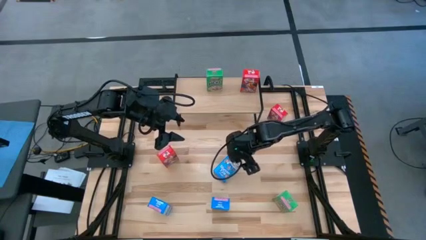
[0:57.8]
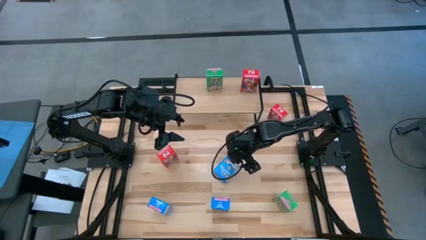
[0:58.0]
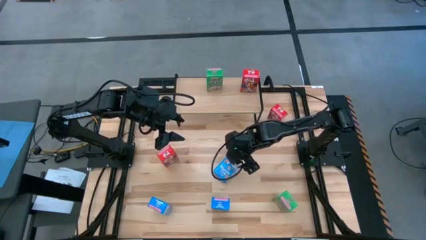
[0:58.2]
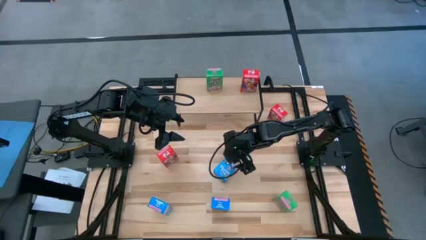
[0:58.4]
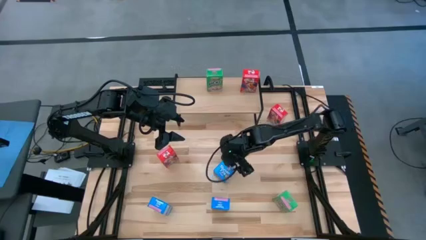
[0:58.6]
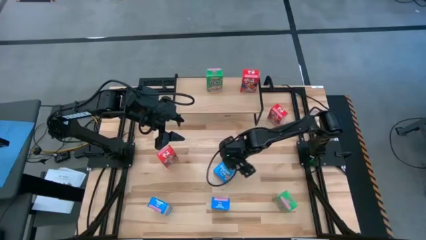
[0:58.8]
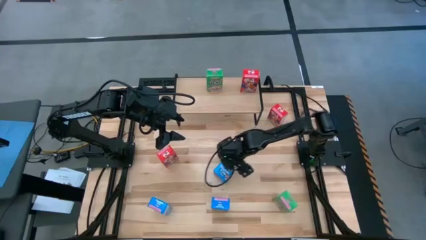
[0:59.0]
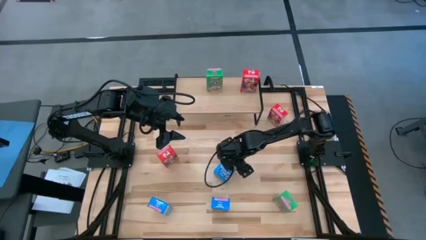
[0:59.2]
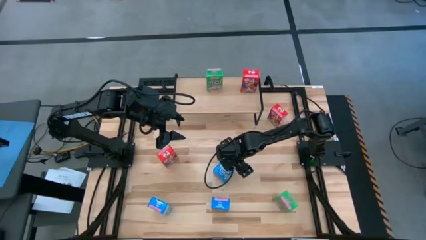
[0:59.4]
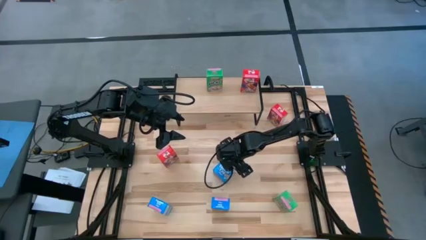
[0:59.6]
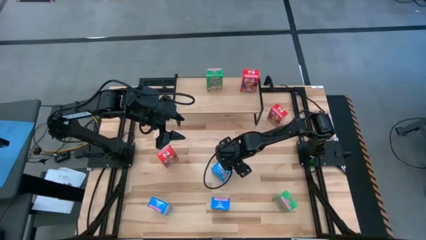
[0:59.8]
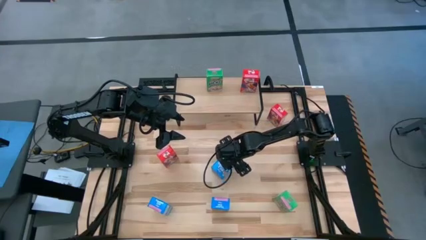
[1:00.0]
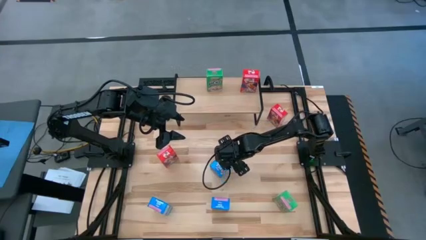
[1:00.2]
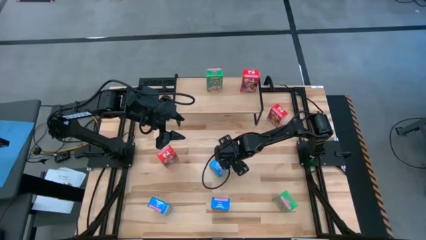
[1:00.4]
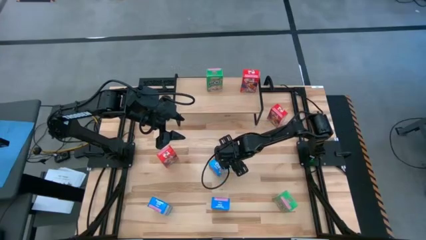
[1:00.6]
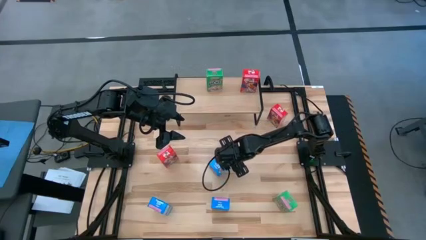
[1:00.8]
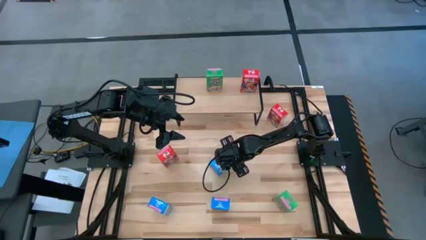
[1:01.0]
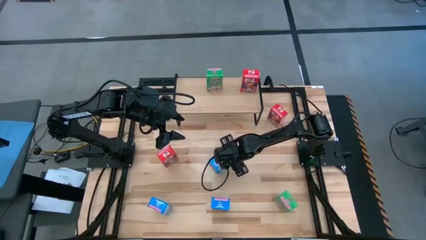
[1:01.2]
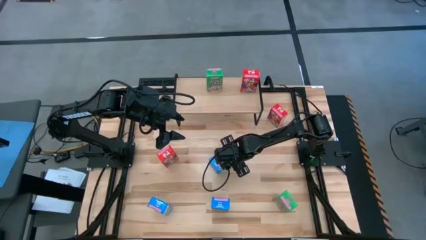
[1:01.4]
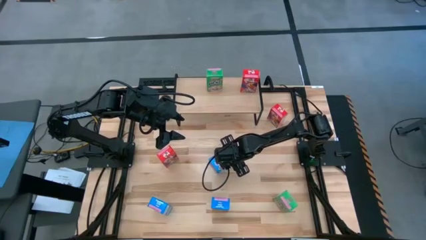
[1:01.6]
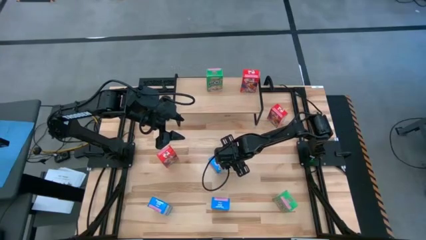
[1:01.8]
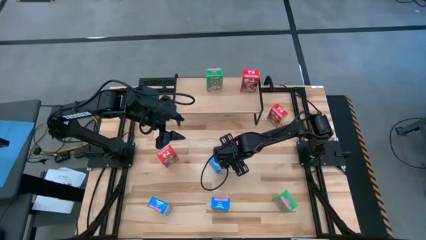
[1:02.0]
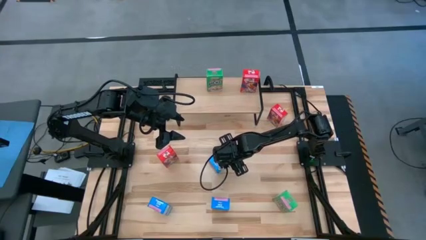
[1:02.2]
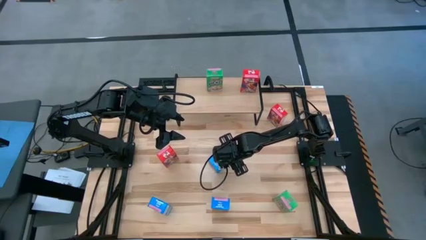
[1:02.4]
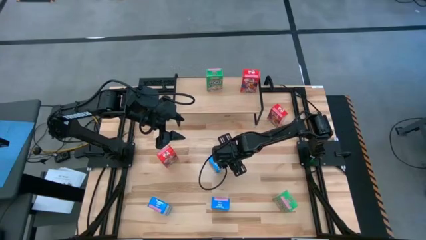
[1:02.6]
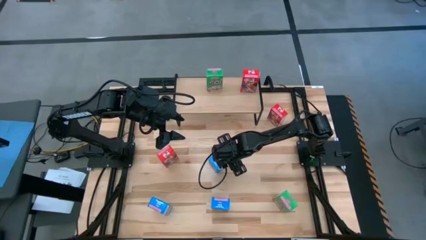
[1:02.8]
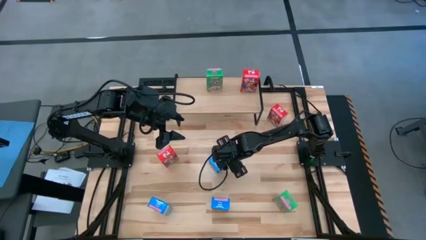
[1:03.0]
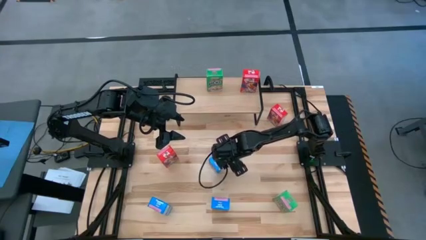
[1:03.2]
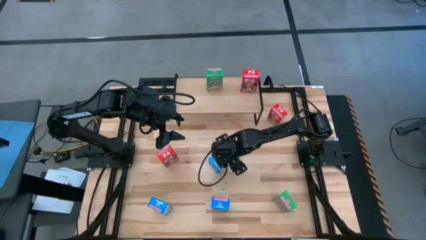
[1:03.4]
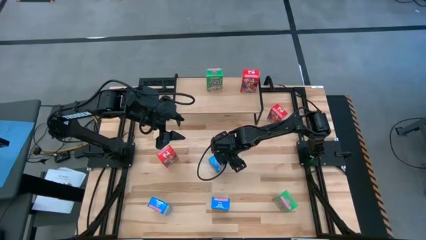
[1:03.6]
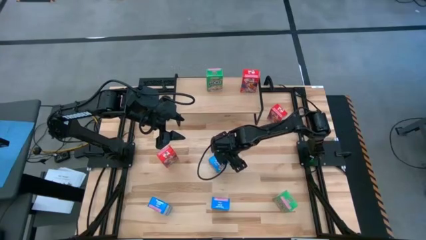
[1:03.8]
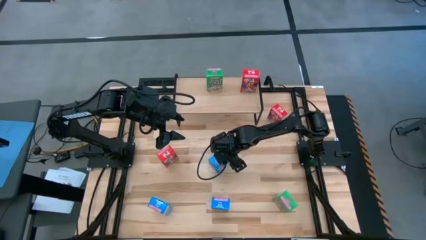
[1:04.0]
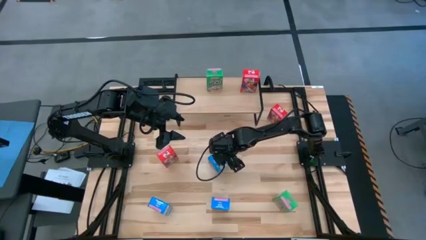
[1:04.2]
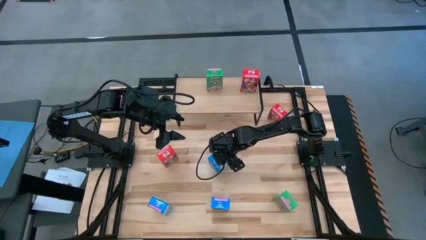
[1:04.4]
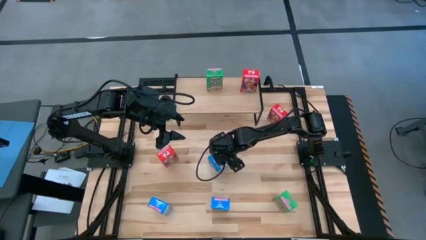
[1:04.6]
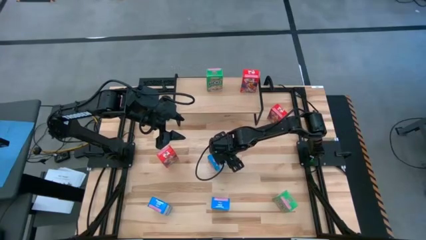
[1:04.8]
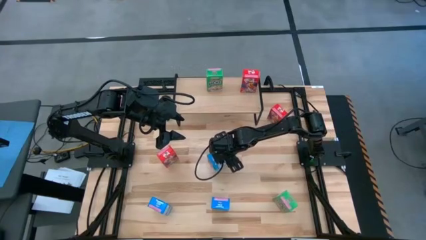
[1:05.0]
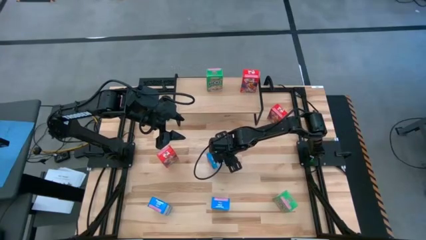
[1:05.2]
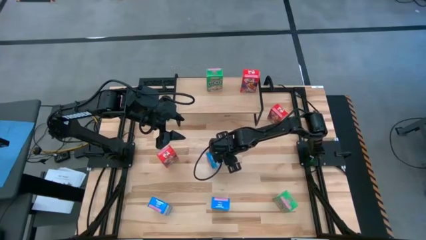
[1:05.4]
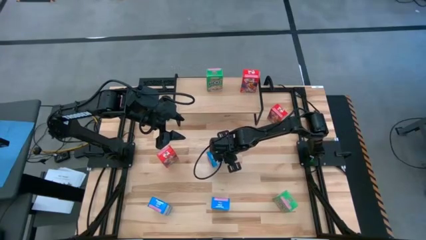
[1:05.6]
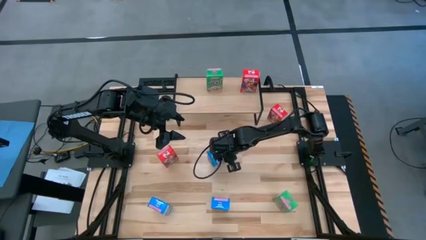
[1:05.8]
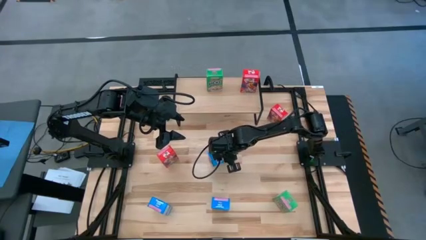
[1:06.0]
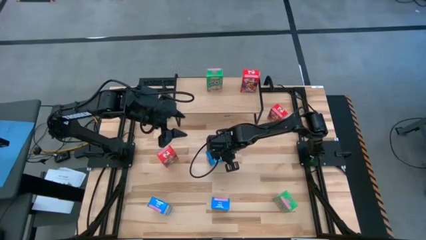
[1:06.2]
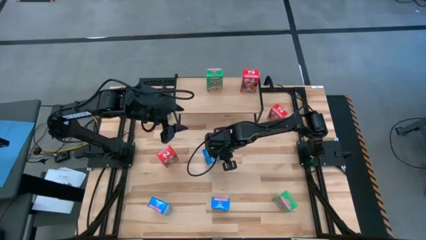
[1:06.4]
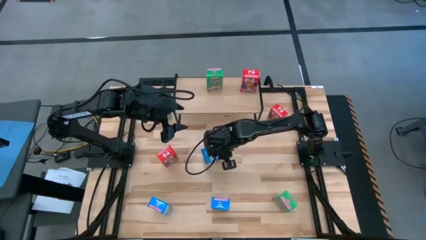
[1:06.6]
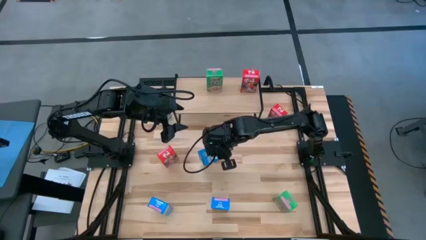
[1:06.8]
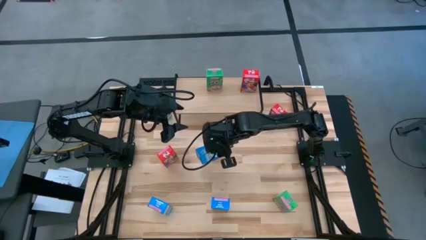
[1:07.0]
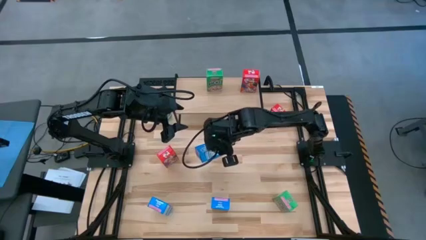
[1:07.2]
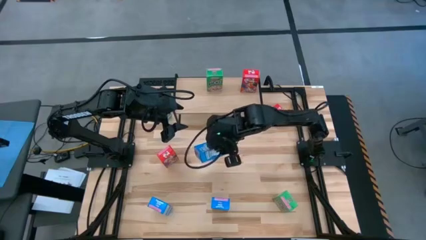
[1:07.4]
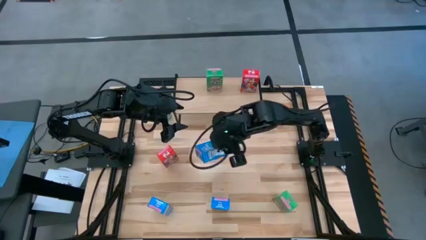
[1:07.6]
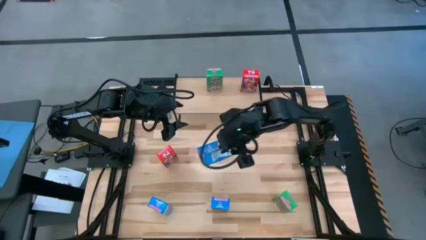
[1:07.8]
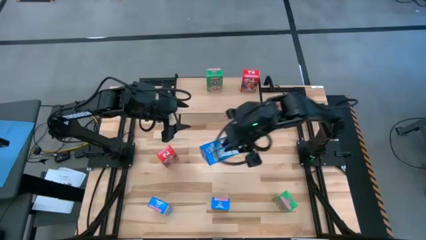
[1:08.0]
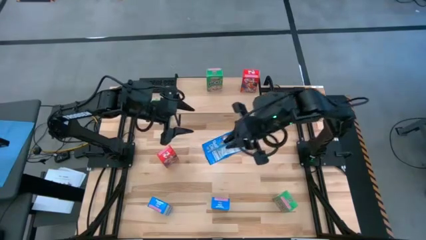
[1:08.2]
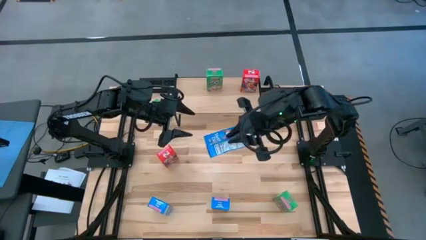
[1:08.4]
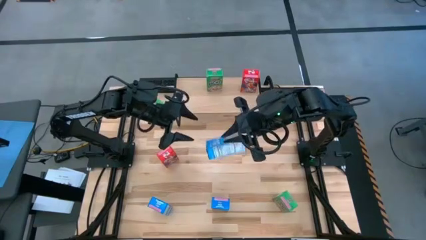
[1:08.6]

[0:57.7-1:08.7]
Task: Stack cereal on shelf
Put the top right blue cereal box on the shelf

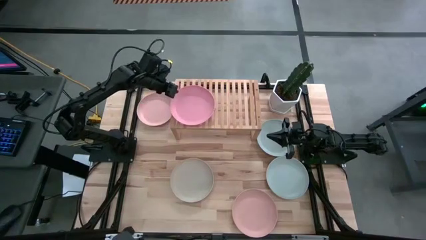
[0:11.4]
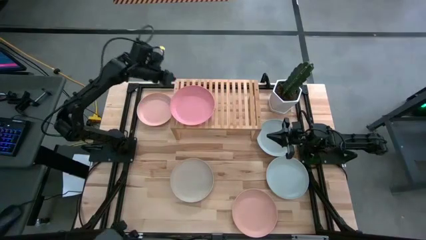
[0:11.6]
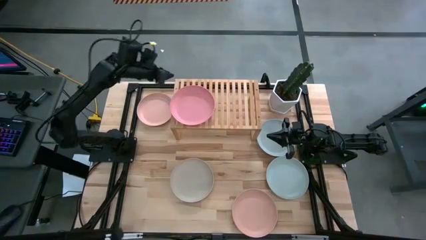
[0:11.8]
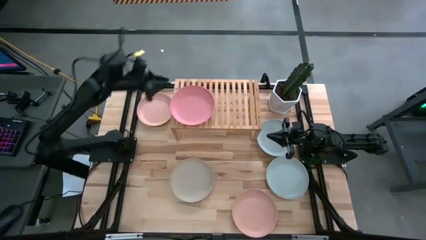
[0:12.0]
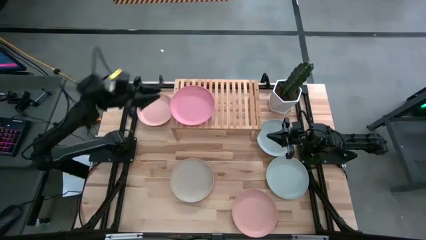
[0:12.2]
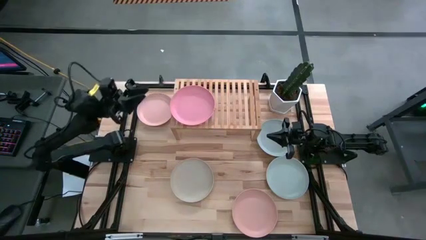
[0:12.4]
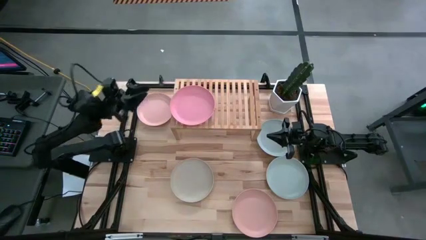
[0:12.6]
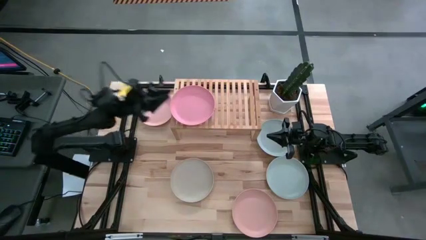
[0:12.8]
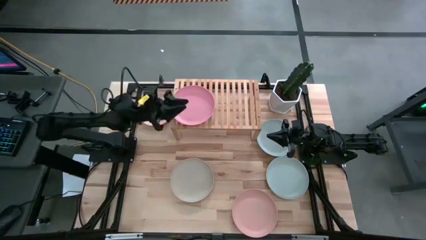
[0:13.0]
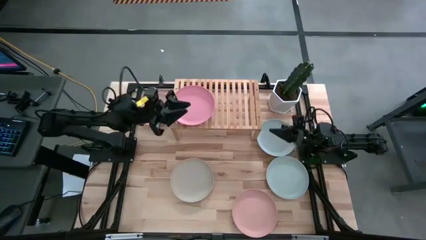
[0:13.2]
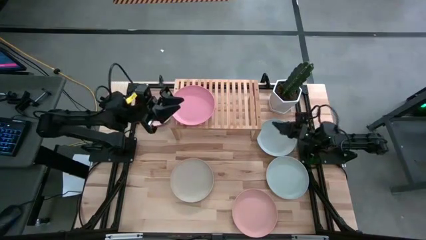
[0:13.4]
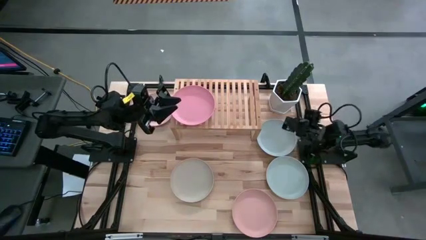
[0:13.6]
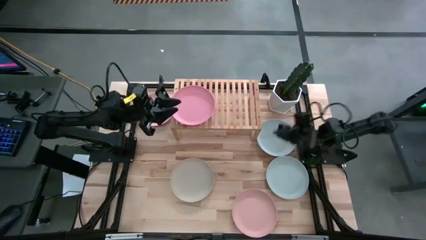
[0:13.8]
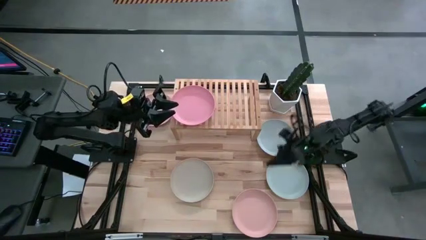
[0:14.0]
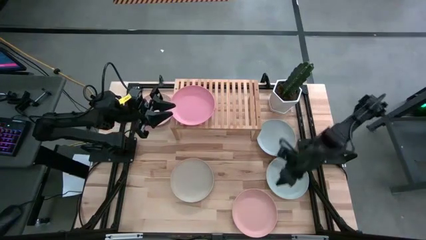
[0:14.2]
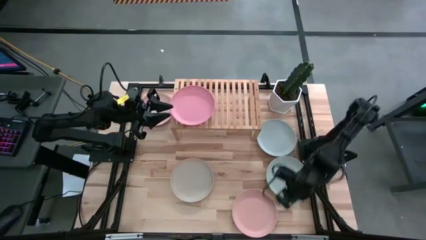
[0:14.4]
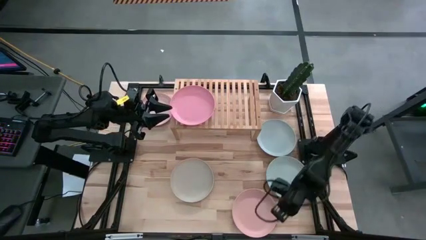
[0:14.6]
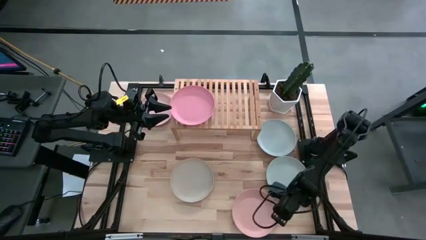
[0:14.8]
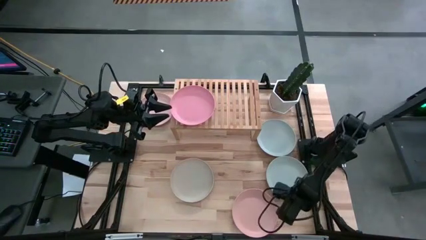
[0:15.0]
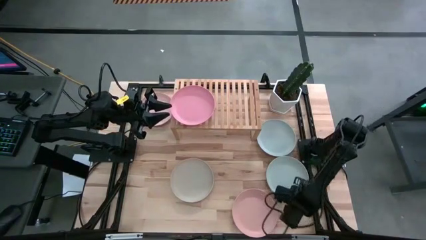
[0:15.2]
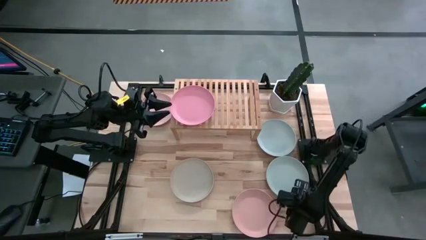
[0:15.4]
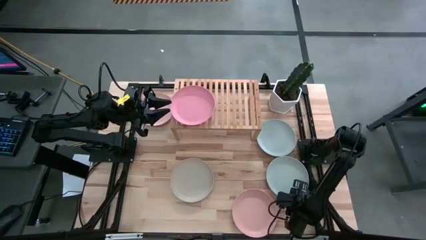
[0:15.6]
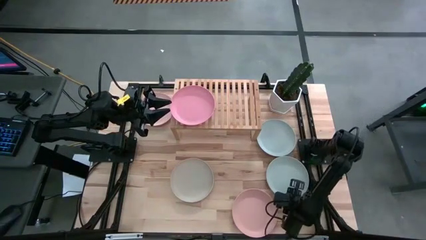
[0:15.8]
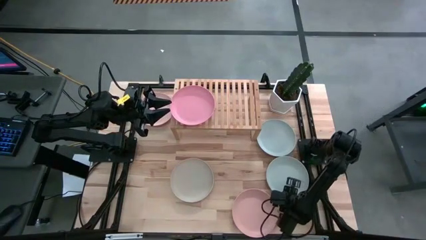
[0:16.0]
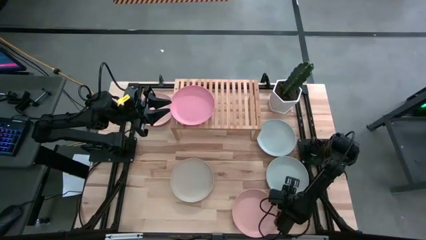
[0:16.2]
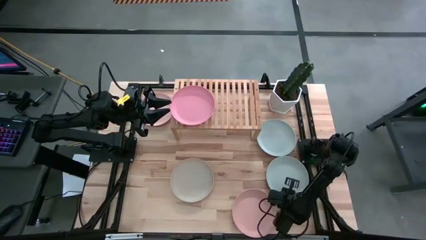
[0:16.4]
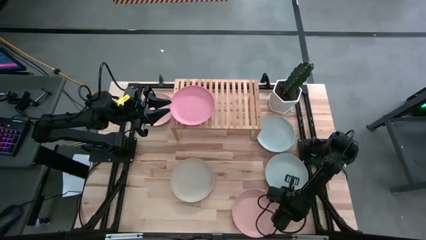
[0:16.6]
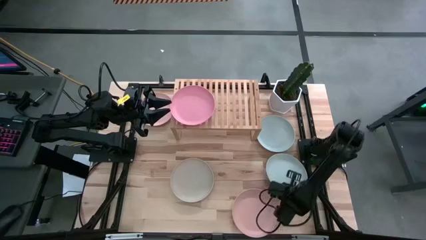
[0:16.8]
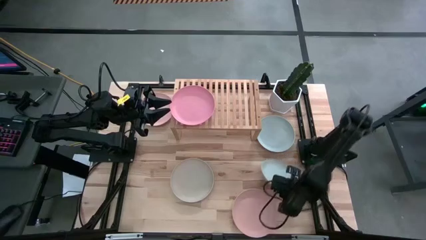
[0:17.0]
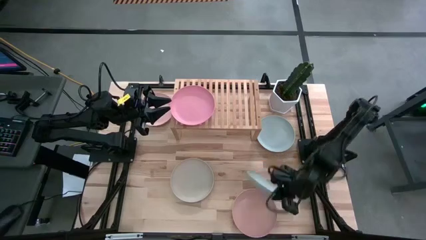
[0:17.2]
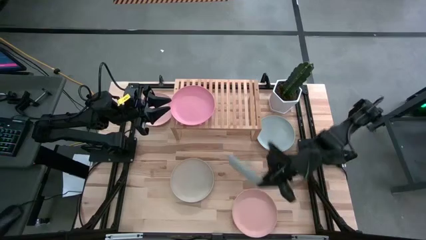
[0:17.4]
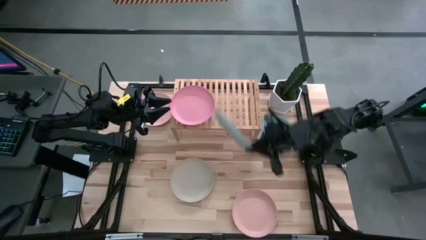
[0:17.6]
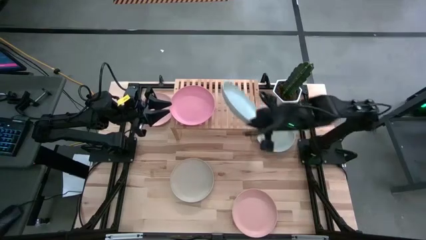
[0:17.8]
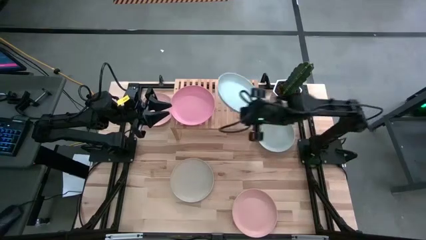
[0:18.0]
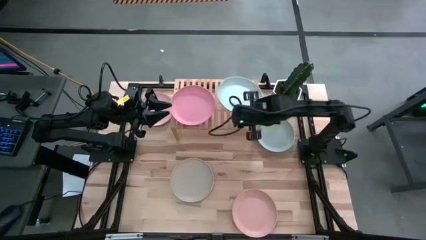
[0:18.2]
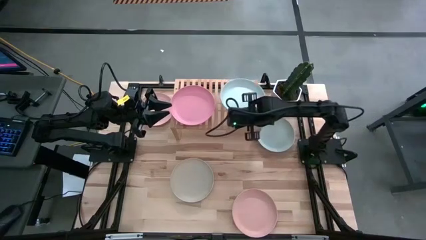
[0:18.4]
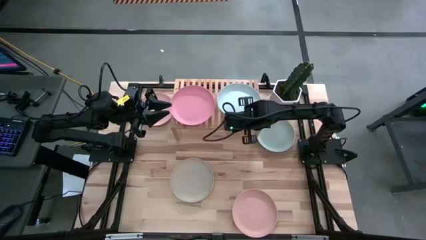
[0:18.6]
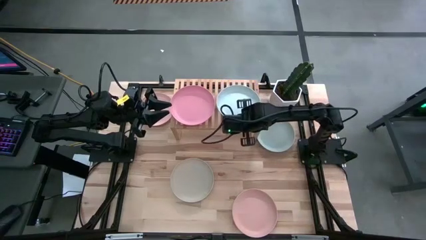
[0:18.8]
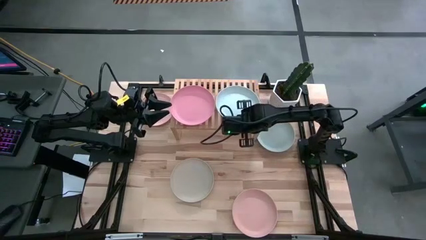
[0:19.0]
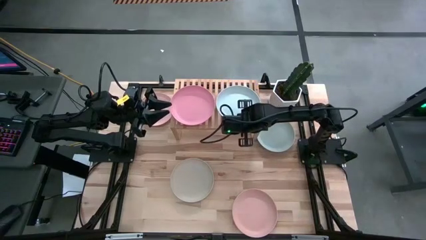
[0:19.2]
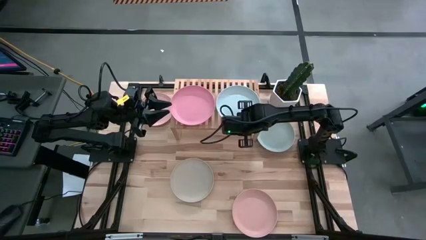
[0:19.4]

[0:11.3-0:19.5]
Task: Place and stack plates onto a shelf
Put the bottom blue plate on the shelf
